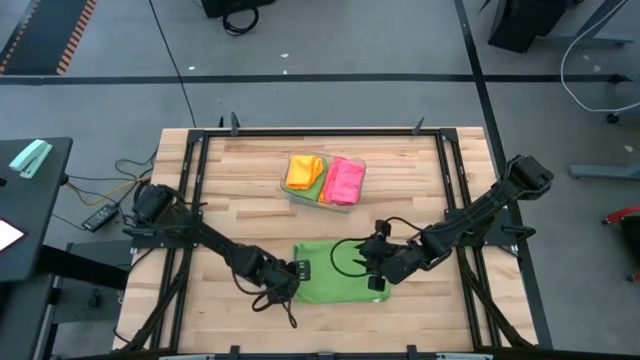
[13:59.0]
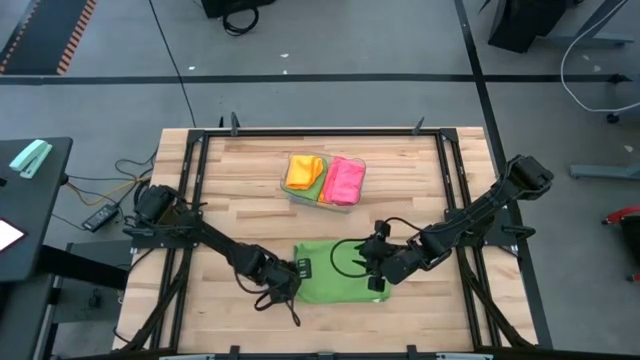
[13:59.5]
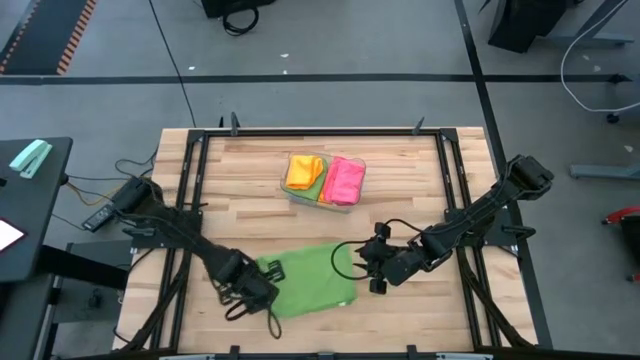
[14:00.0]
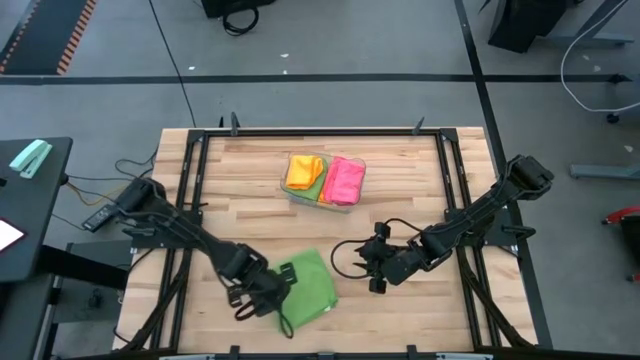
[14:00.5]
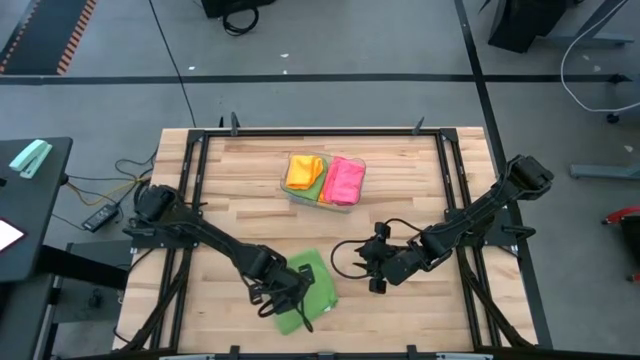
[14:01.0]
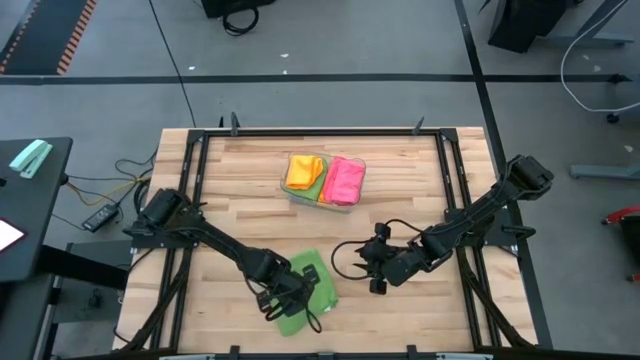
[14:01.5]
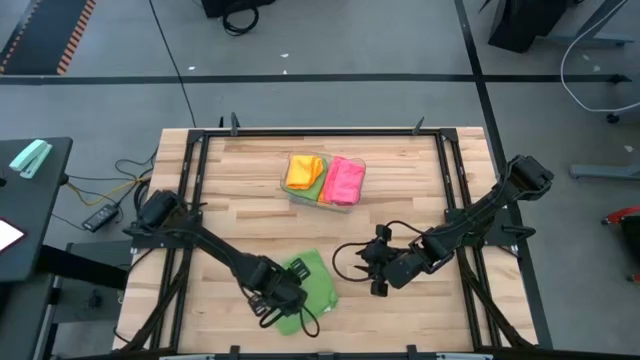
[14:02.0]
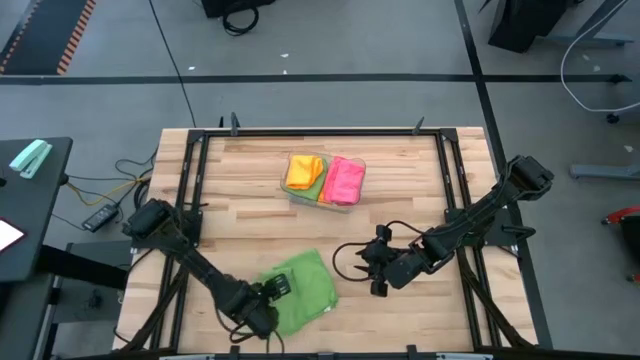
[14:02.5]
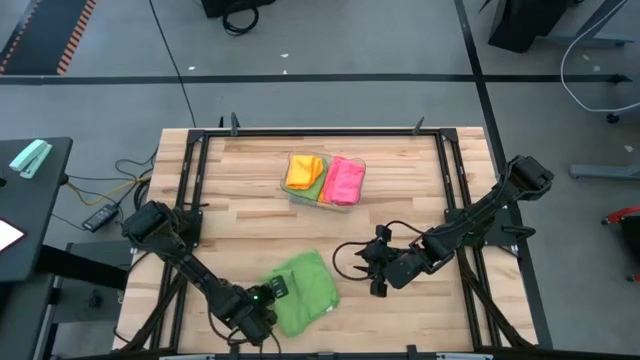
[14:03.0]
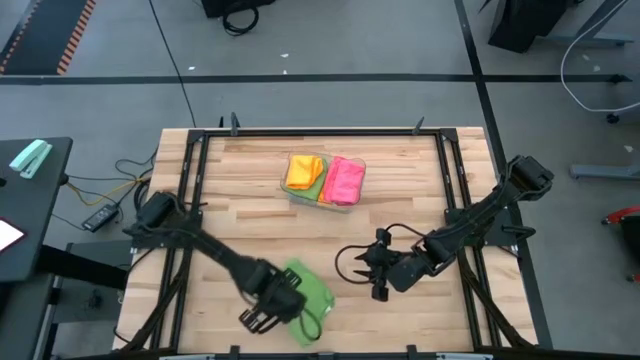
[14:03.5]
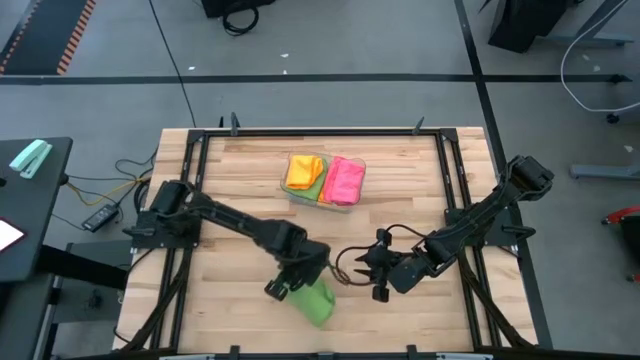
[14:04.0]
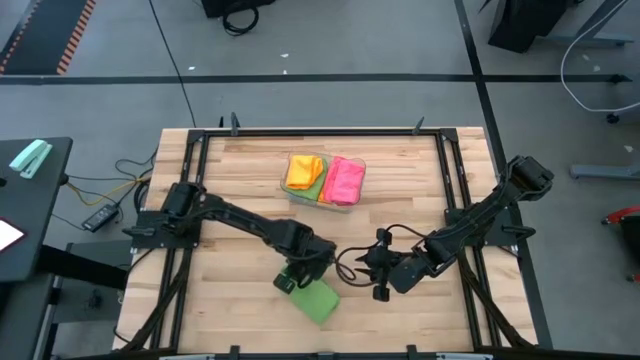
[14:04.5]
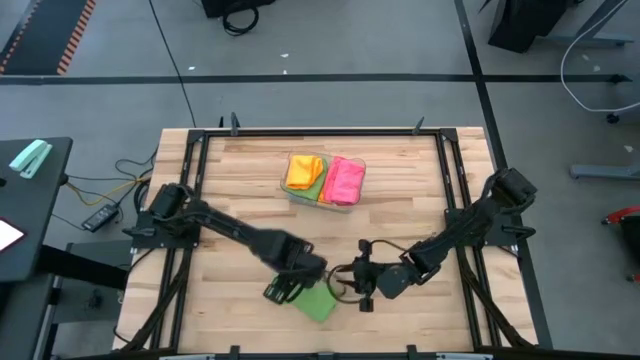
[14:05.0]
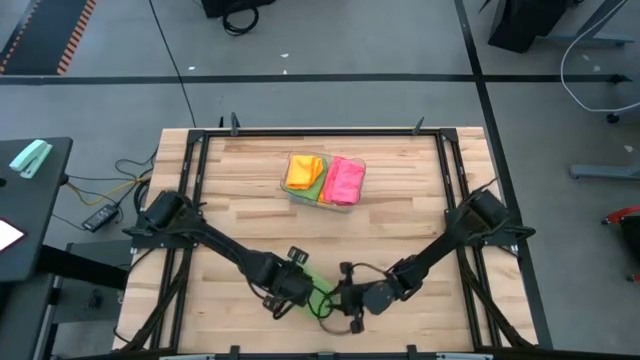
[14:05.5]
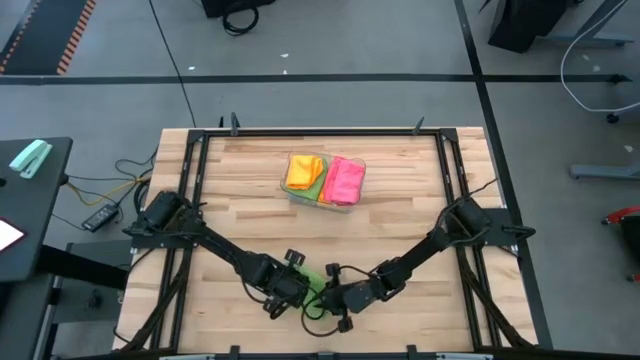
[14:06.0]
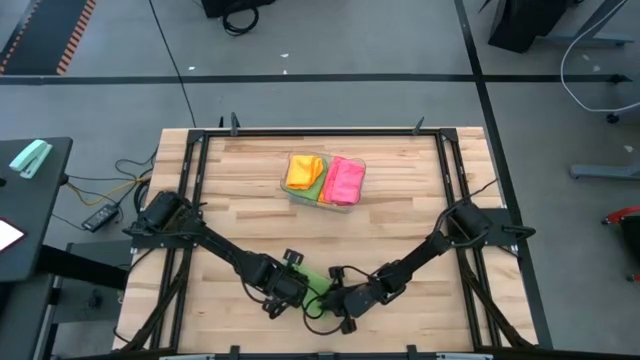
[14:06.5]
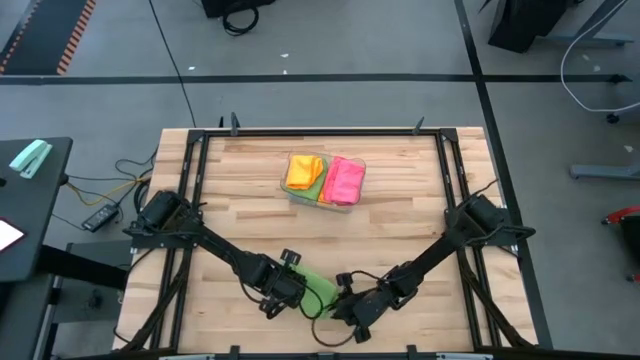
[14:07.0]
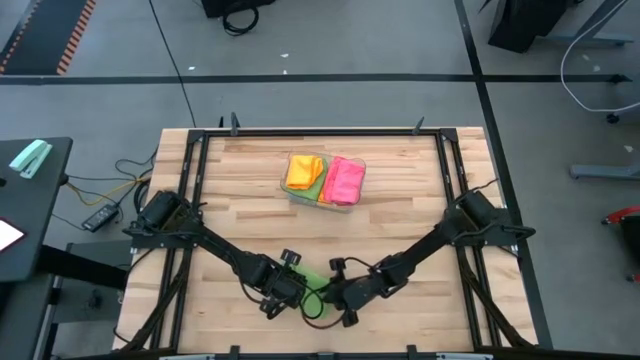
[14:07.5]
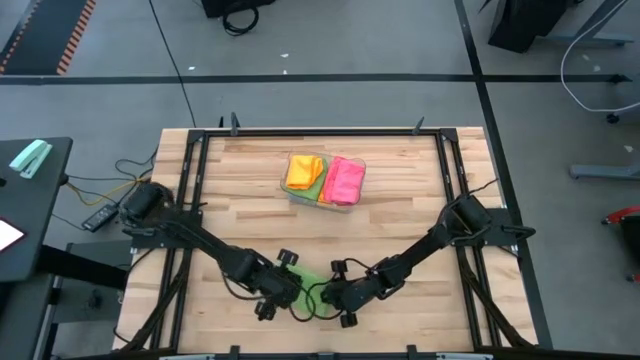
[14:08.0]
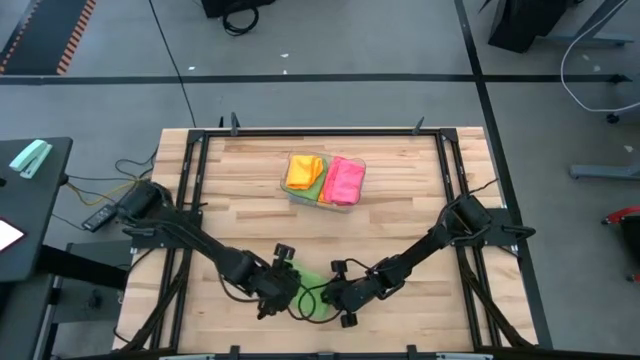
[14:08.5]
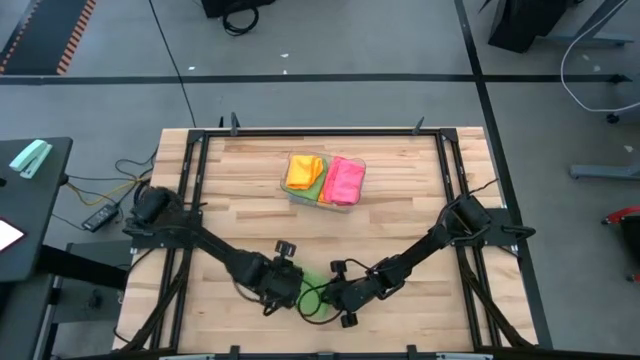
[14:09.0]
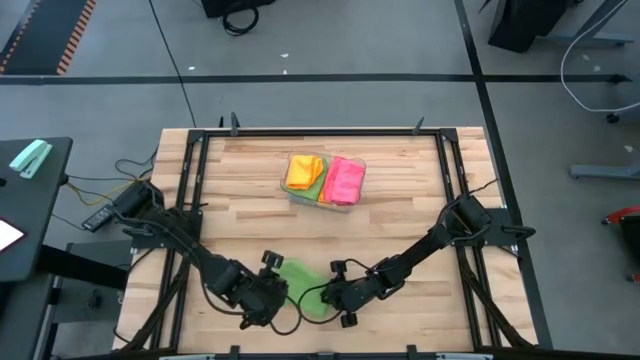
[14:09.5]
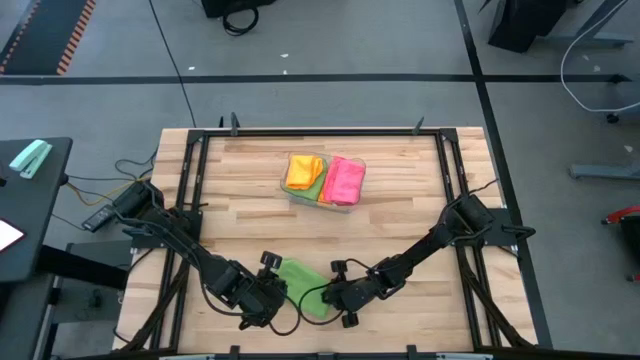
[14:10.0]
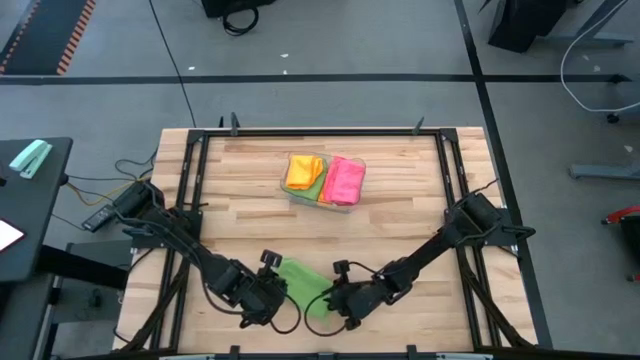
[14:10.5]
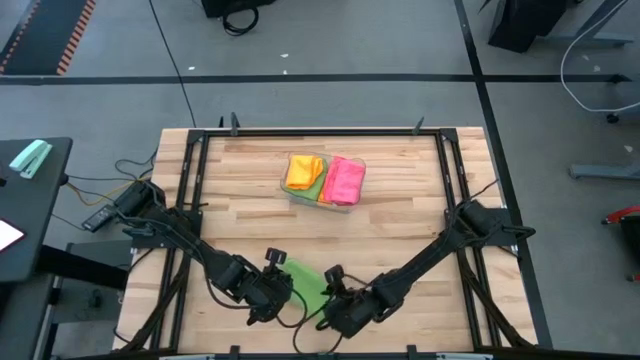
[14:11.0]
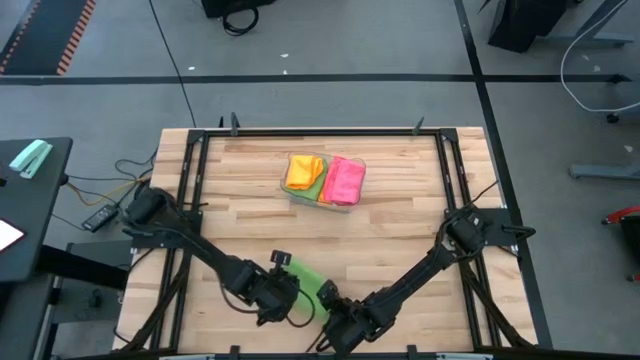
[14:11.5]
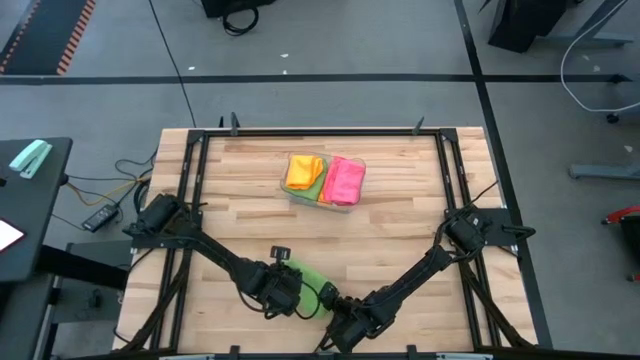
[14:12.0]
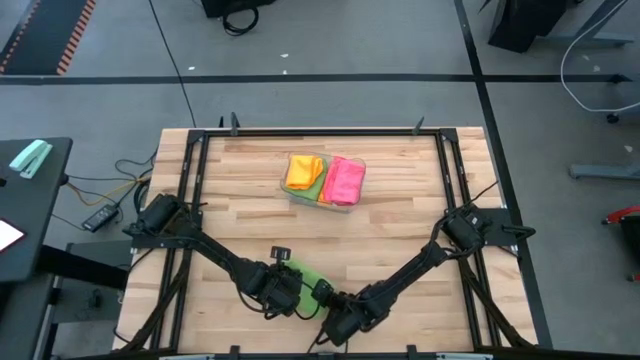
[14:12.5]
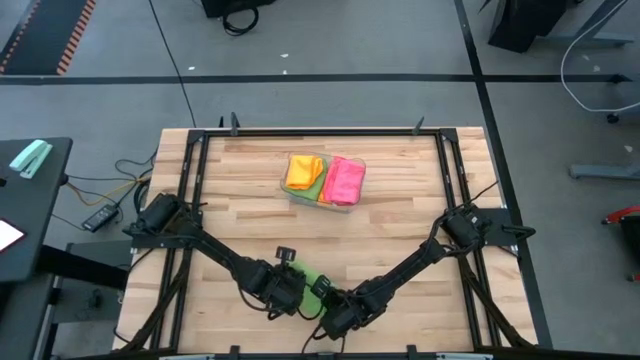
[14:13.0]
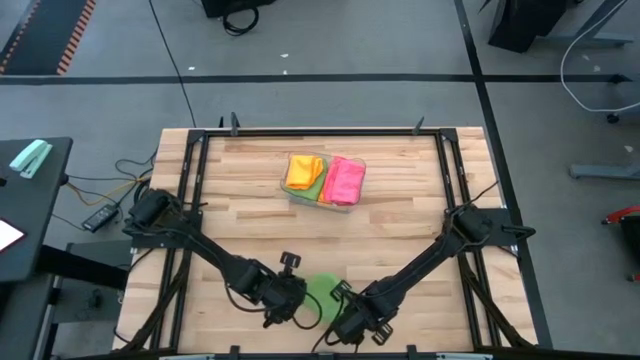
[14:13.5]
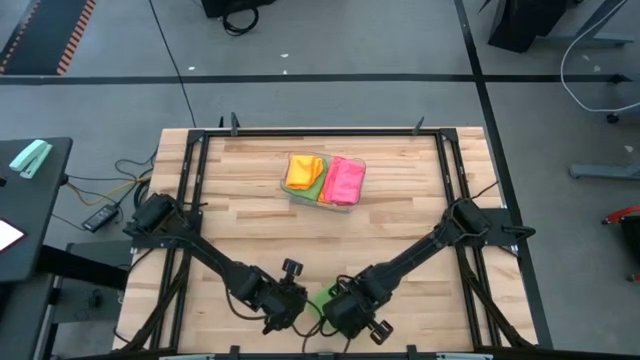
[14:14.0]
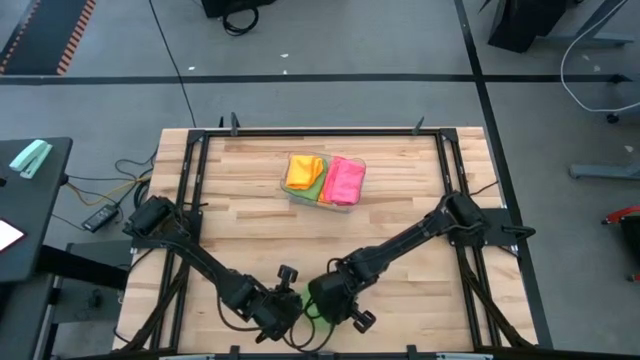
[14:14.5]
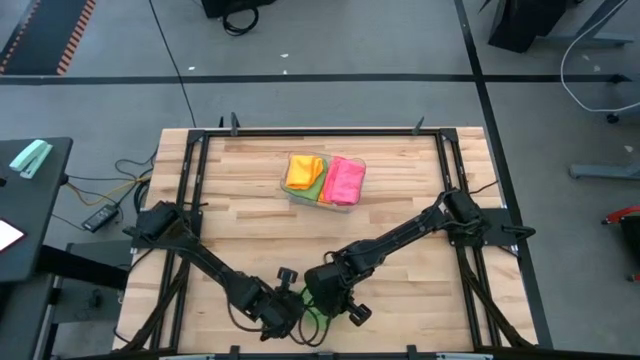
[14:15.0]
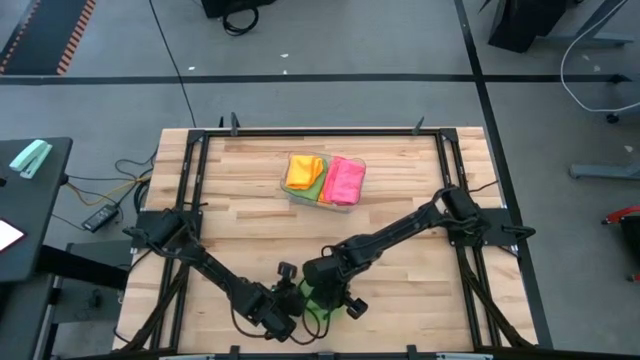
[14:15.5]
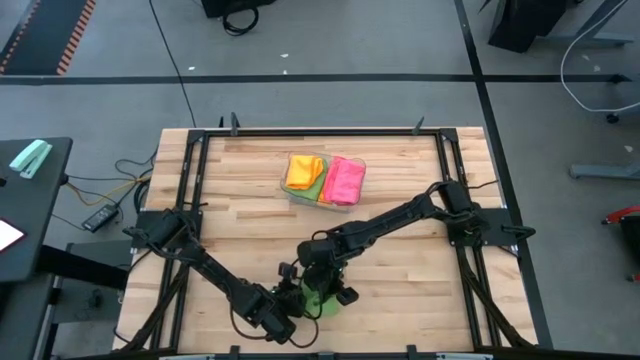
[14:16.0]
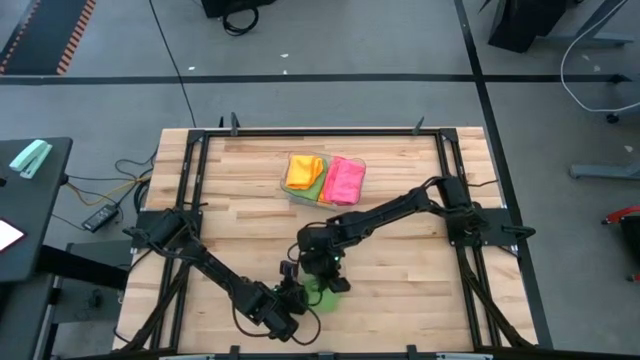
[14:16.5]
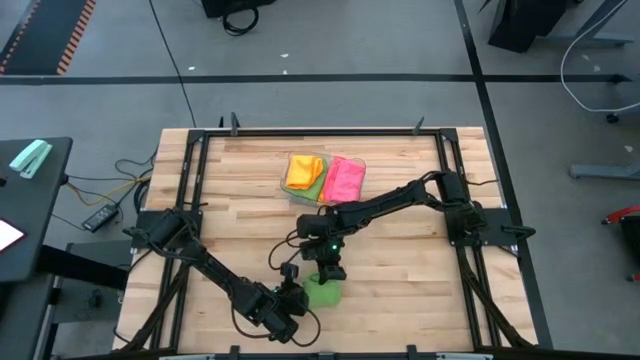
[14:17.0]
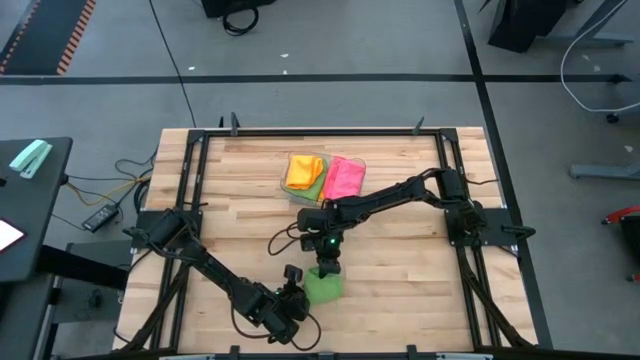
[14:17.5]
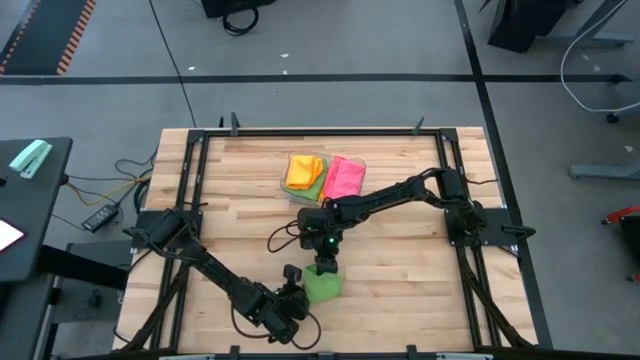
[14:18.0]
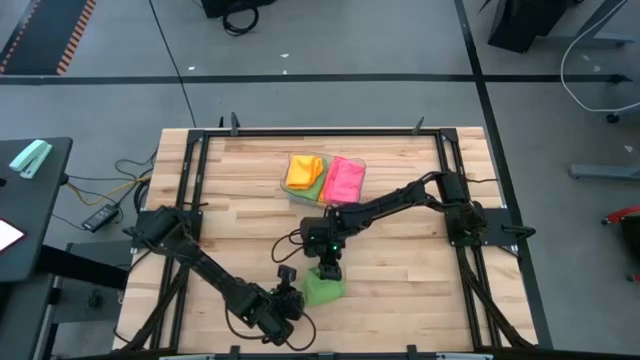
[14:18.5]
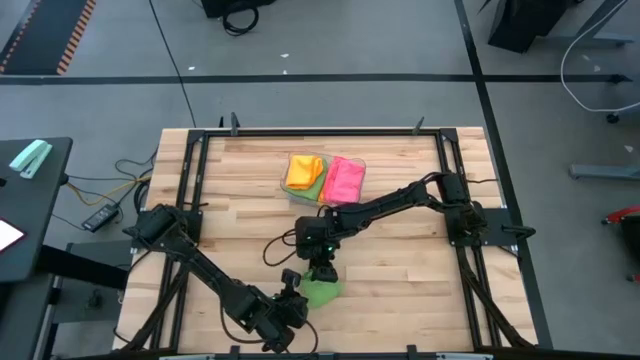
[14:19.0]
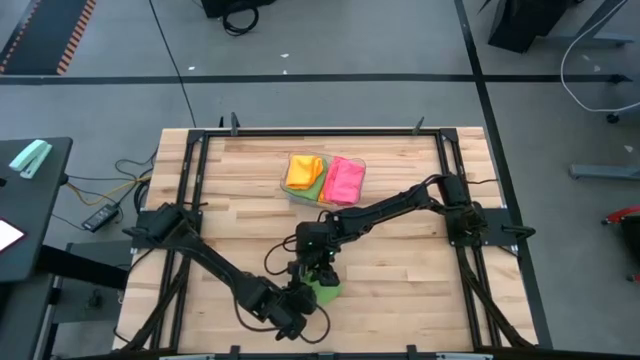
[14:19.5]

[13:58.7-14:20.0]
Task: Fold microfiber towels
Fold the green microfiber cloth
